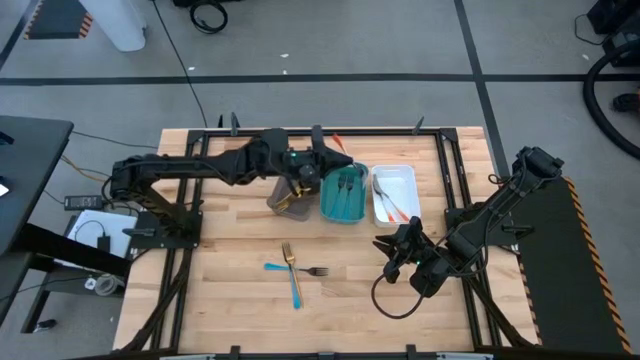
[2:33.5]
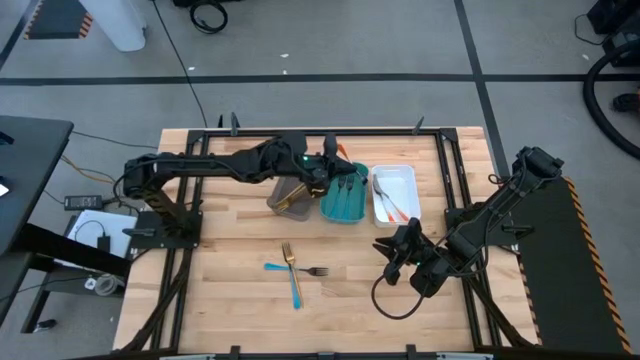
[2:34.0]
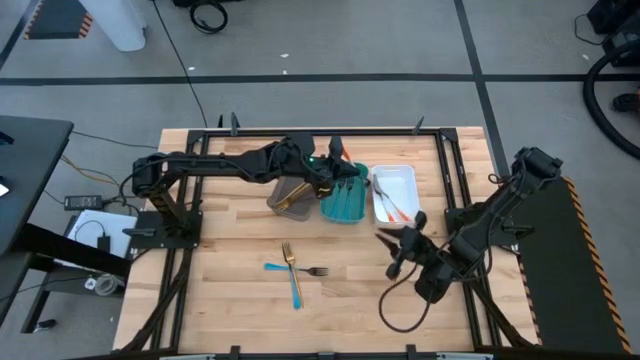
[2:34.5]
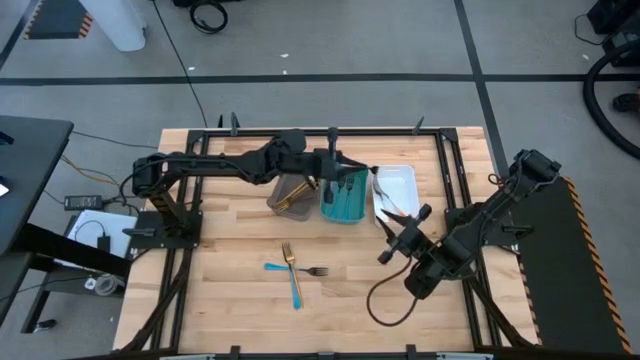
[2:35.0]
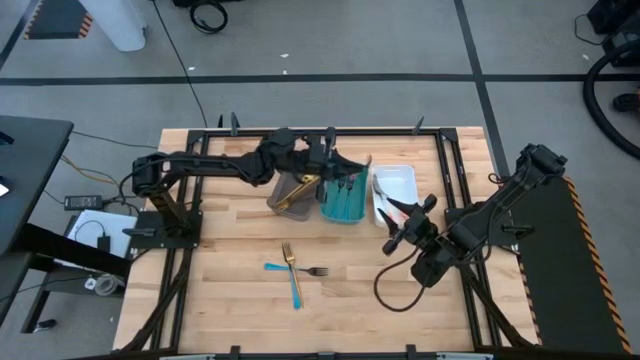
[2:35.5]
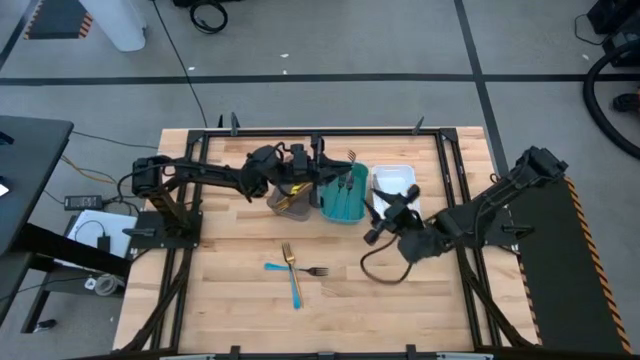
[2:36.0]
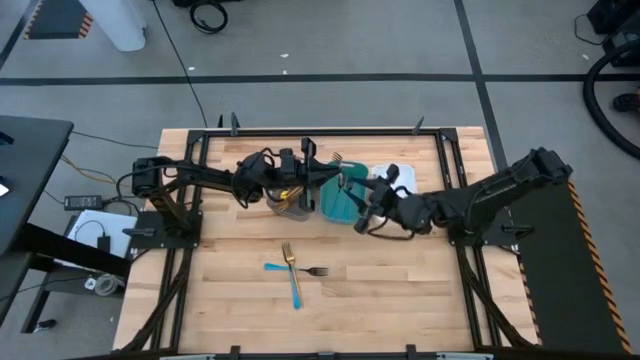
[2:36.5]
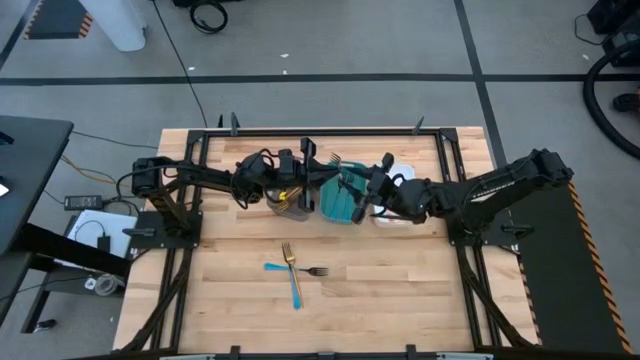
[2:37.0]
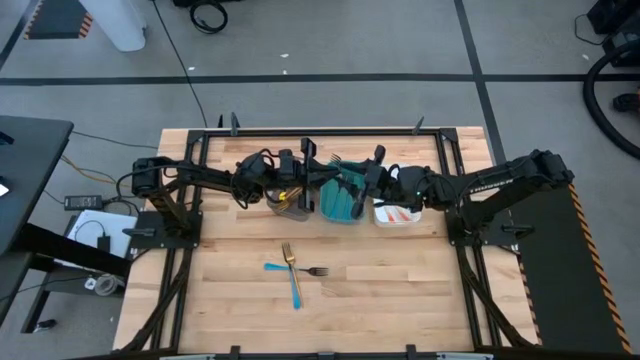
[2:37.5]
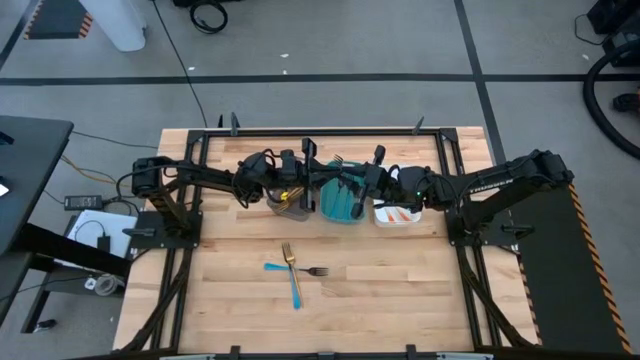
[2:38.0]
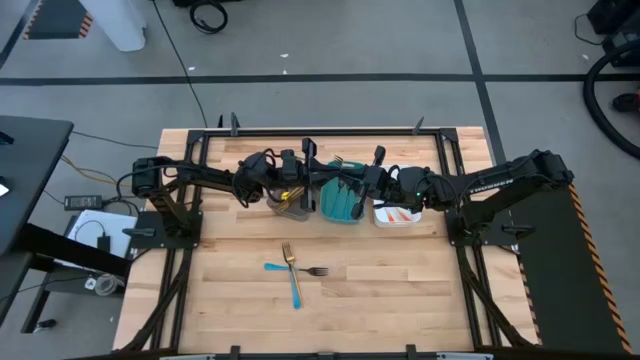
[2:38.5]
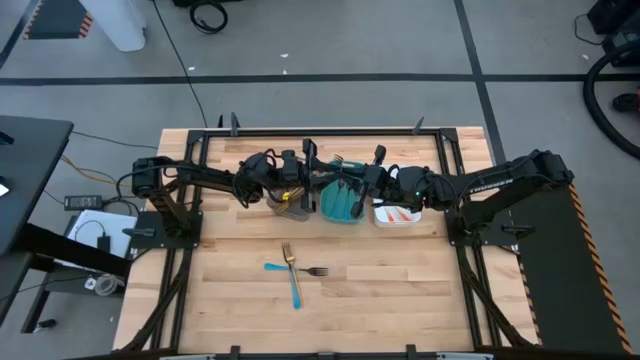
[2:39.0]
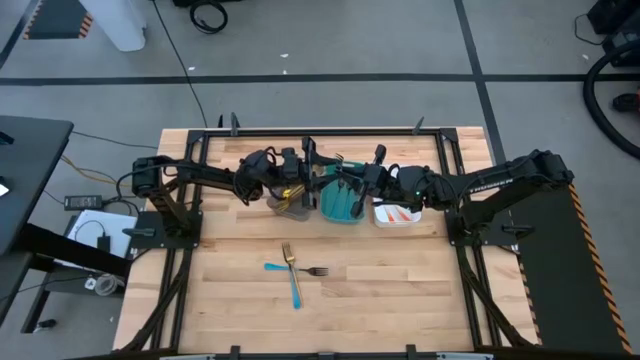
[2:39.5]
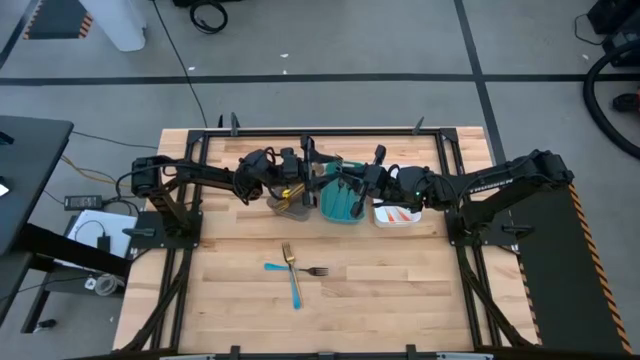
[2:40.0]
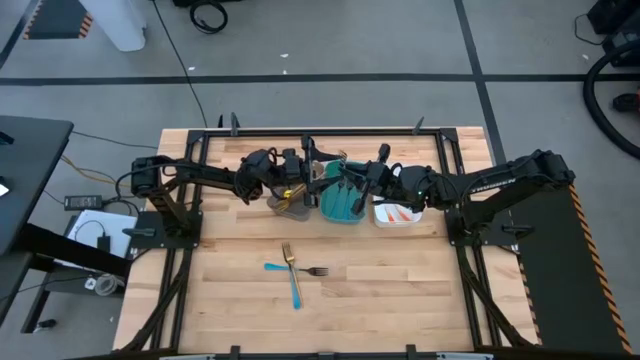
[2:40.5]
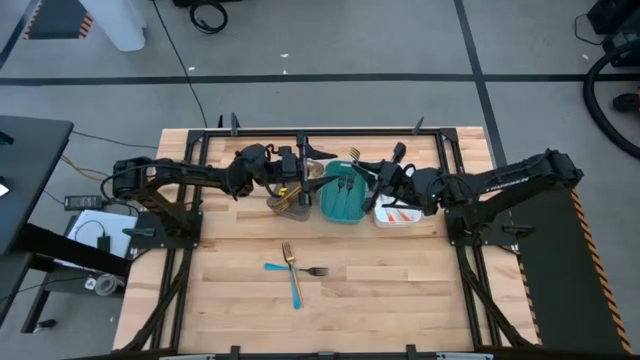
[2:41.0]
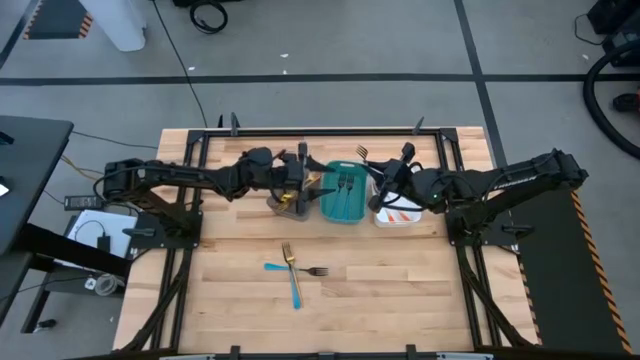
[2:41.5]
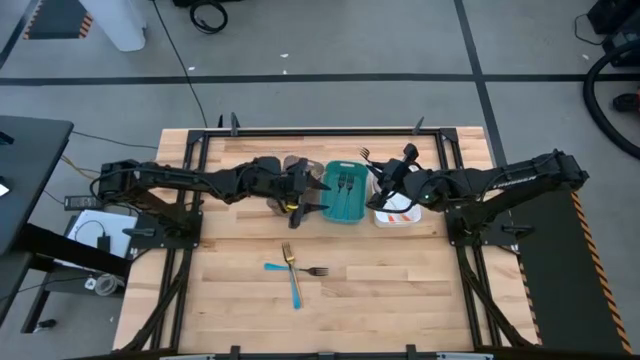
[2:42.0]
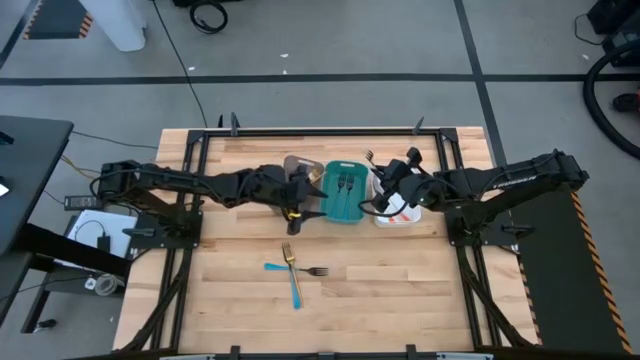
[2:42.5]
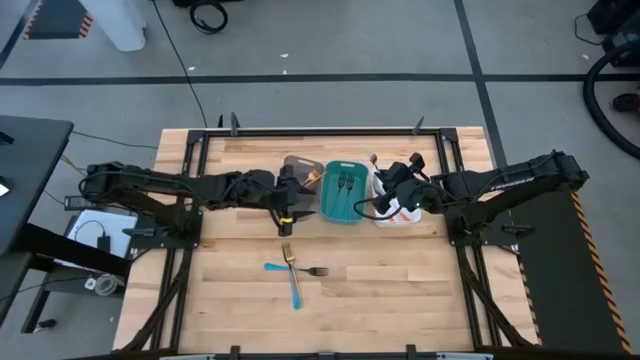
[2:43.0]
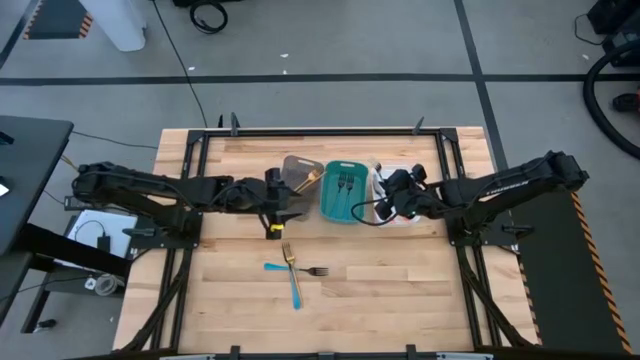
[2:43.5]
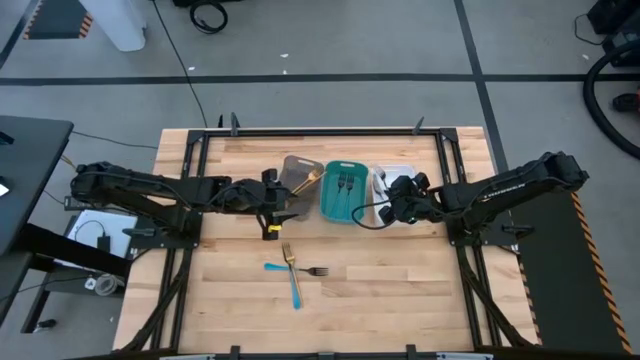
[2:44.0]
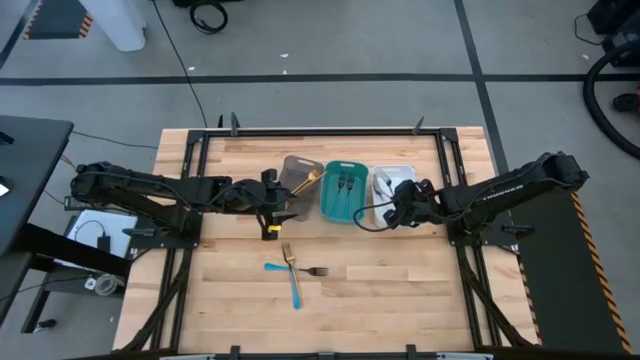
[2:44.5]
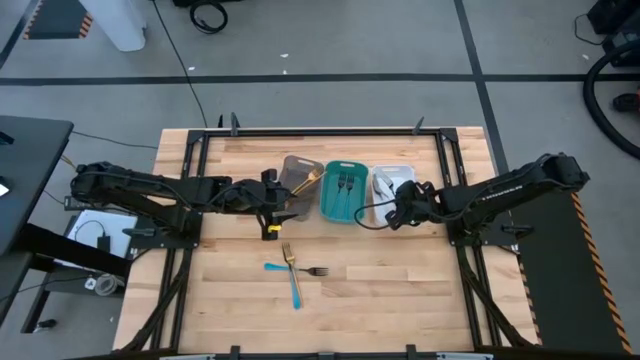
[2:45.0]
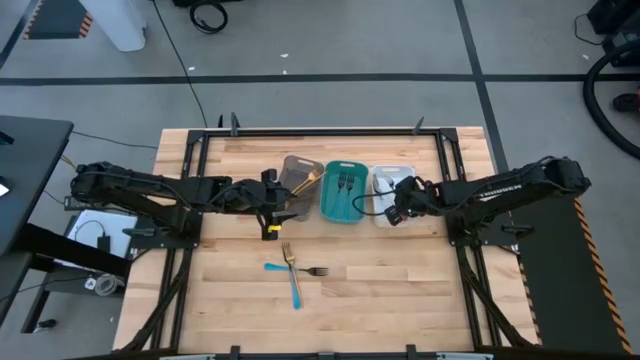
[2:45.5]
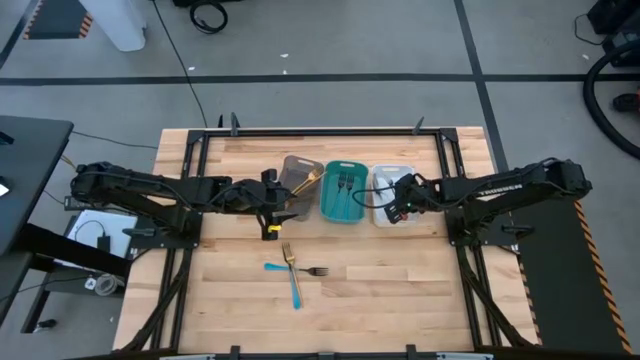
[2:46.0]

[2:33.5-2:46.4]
Task: Sort silverware by color (type)
Put the orange fork into the white bin

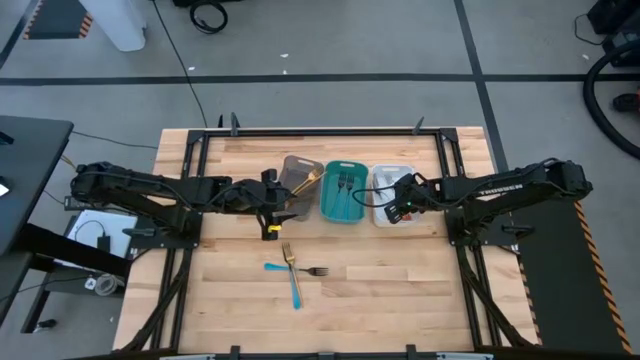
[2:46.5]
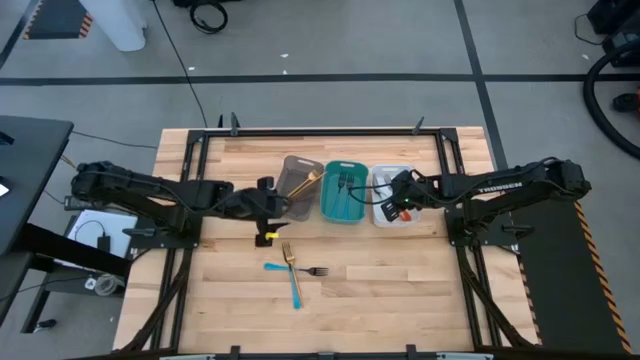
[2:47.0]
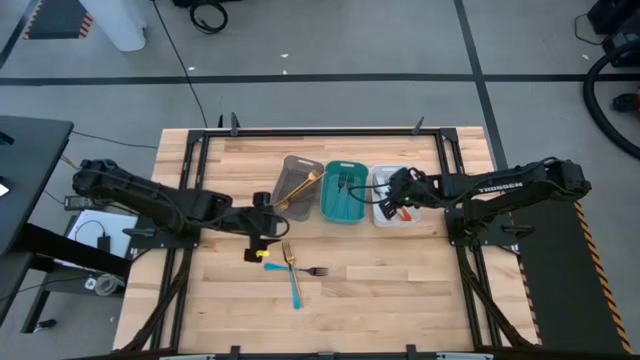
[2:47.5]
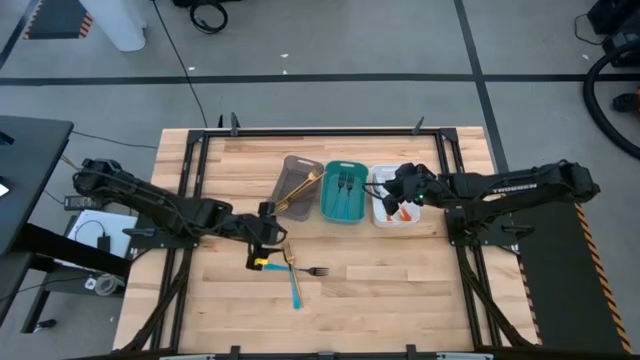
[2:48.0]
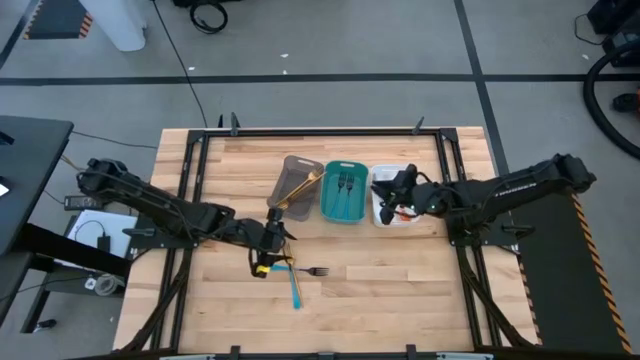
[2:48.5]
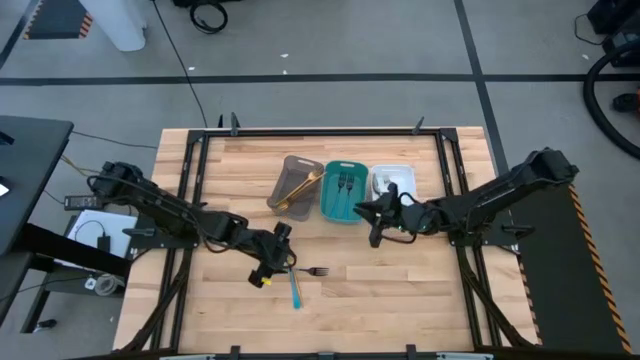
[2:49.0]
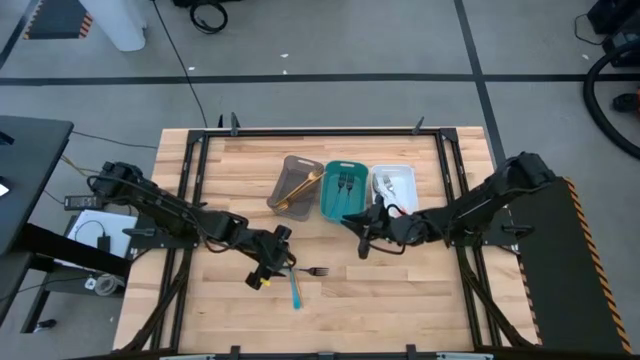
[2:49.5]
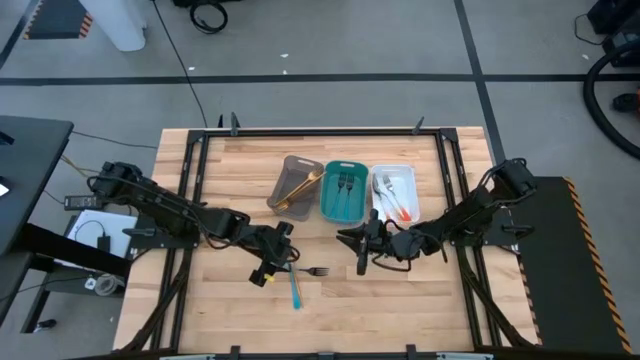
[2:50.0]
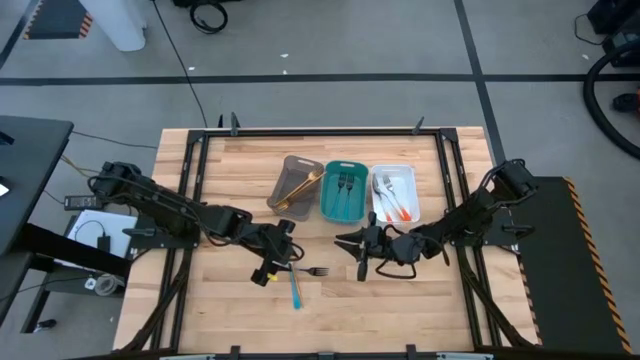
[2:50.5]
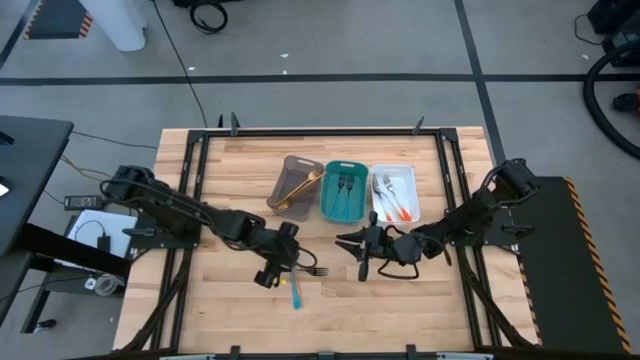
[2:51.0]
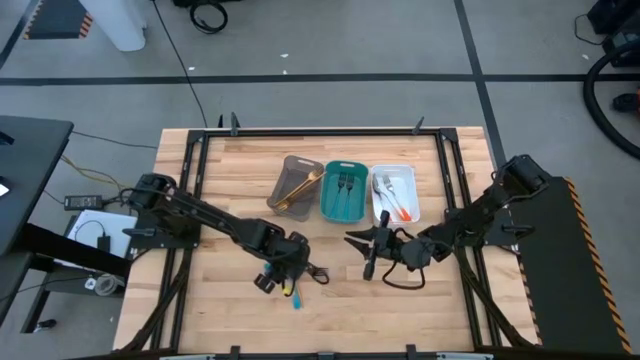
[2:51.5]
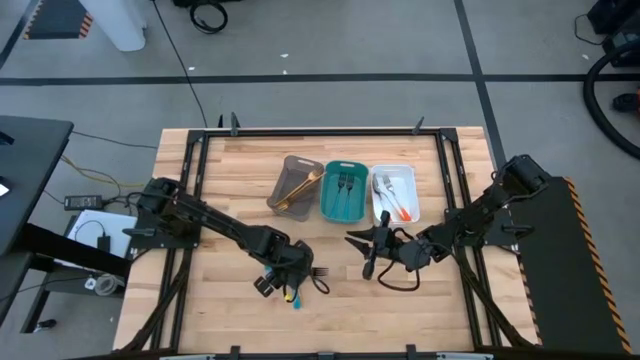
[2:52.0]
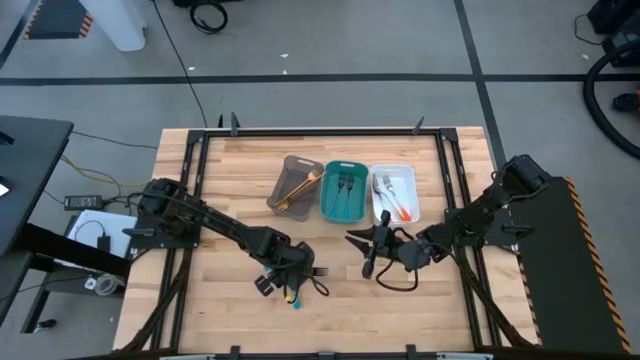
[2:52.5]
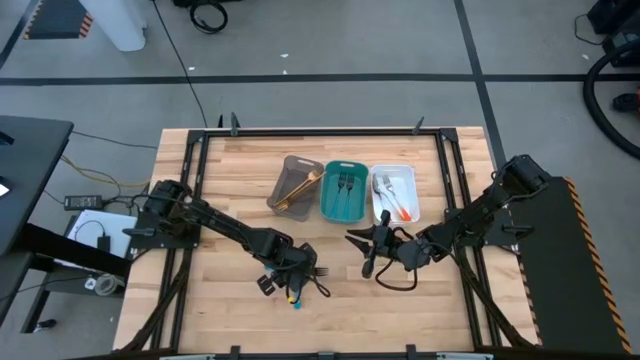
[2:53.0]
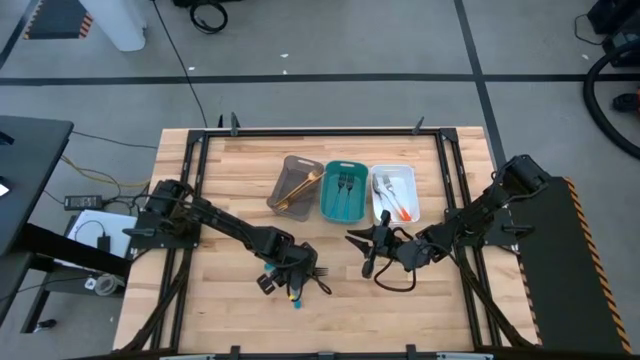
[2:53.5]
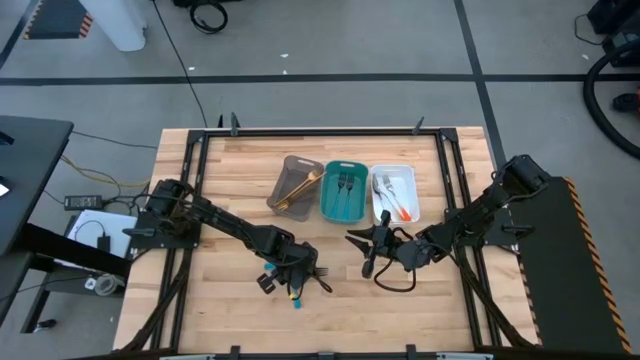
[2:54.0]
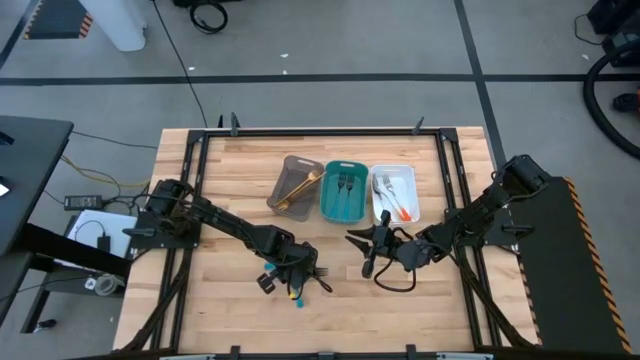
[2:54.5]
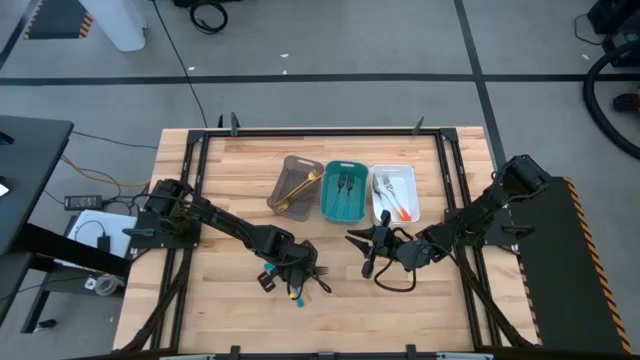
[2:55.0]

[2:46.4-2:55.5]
Put the gold fork into the black bin
